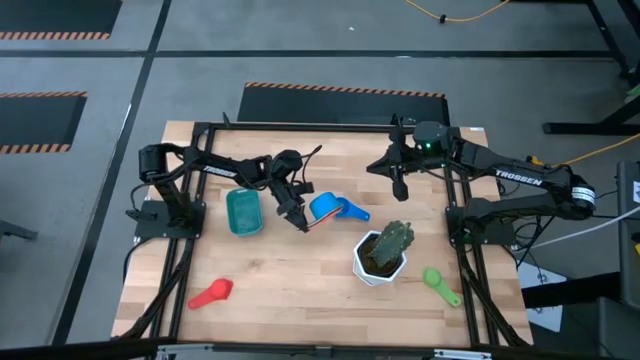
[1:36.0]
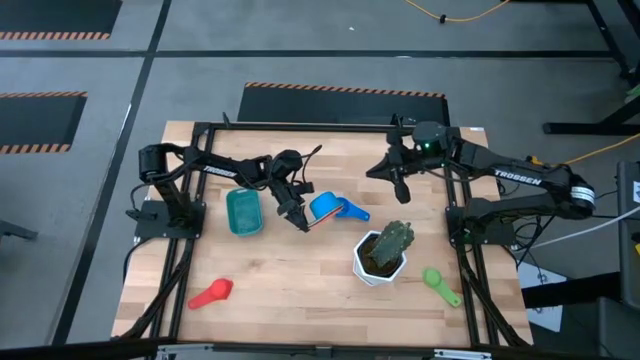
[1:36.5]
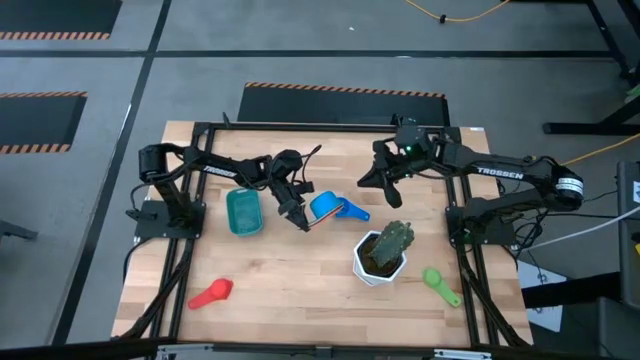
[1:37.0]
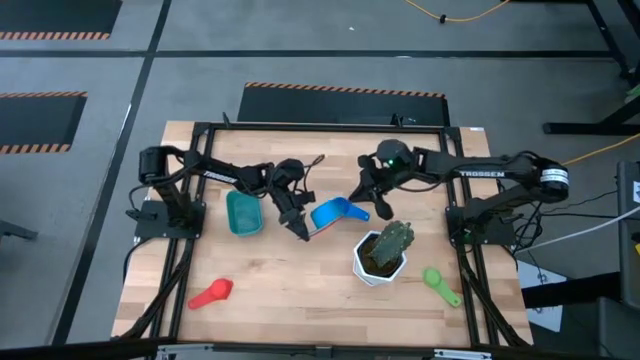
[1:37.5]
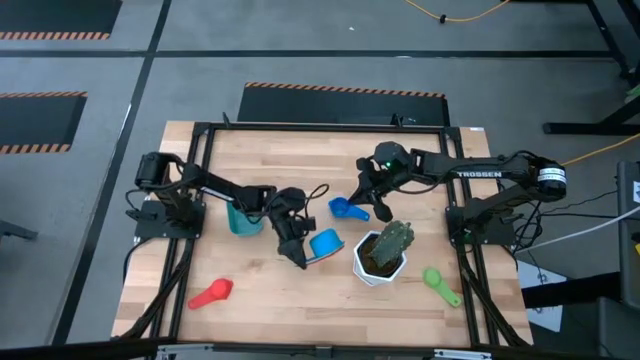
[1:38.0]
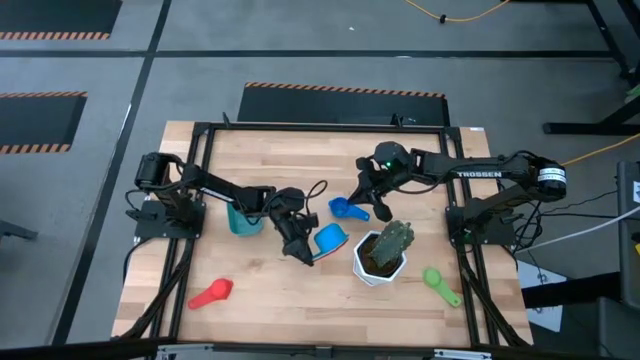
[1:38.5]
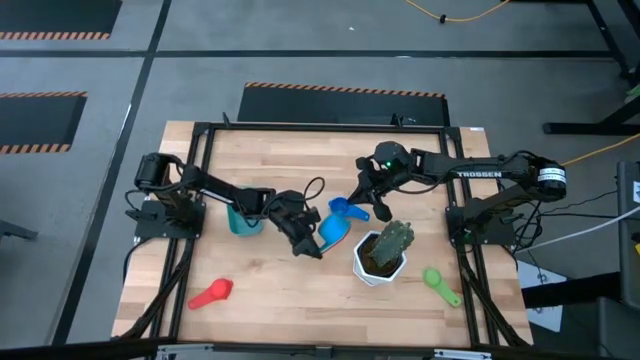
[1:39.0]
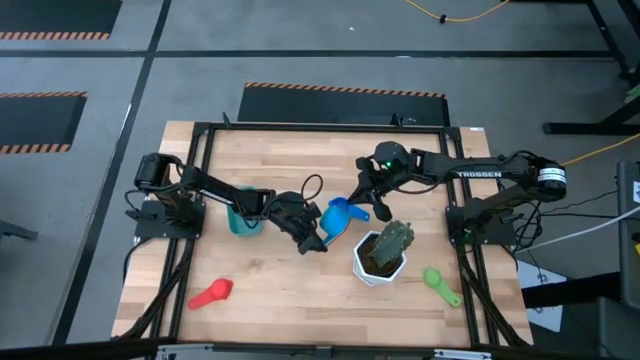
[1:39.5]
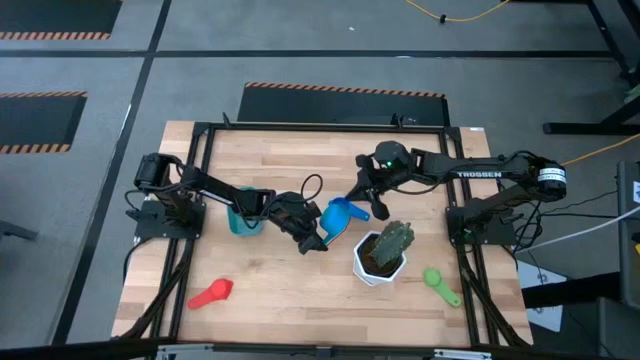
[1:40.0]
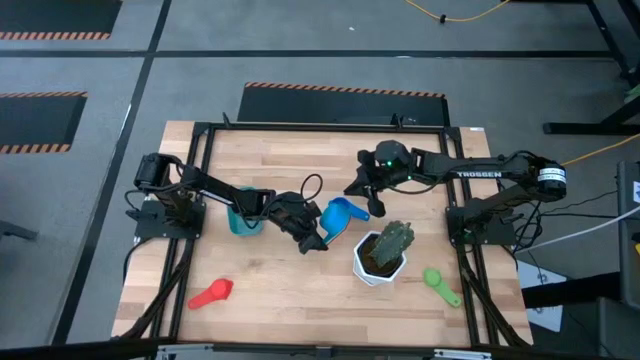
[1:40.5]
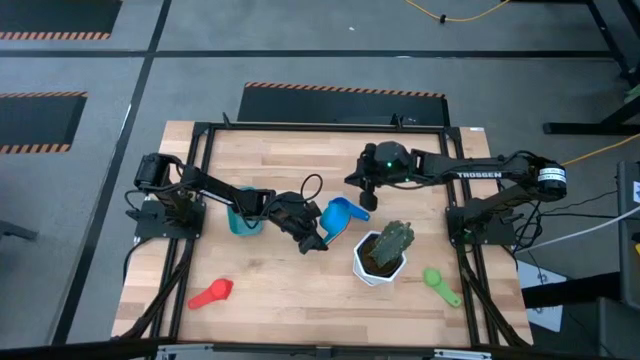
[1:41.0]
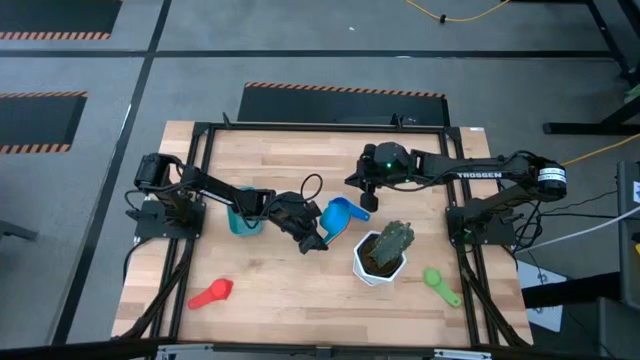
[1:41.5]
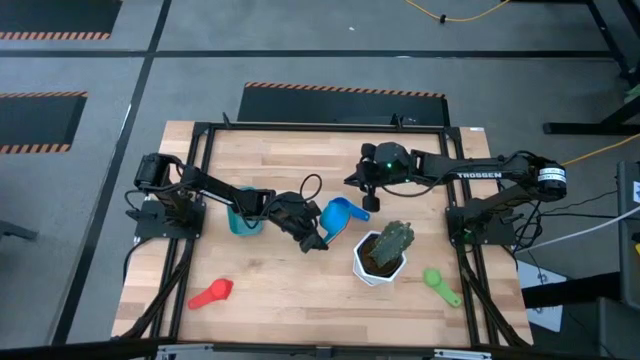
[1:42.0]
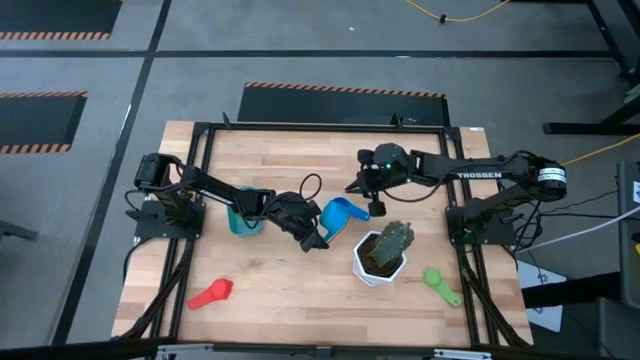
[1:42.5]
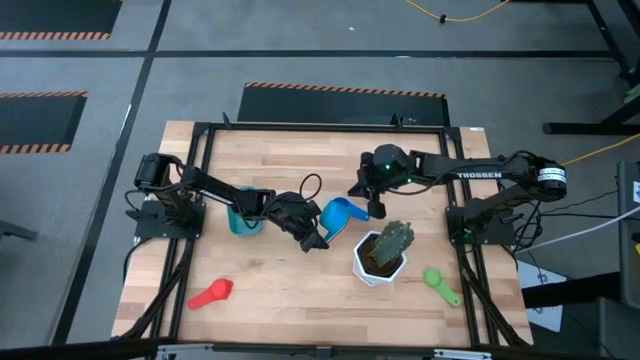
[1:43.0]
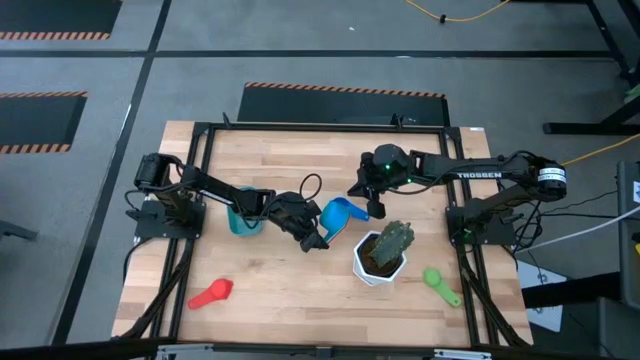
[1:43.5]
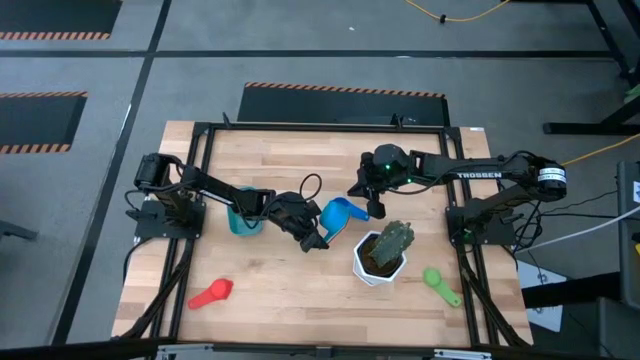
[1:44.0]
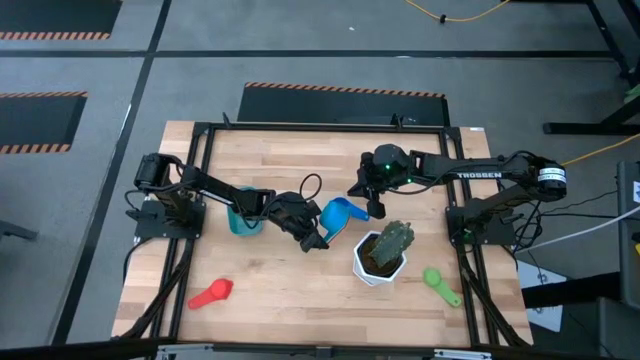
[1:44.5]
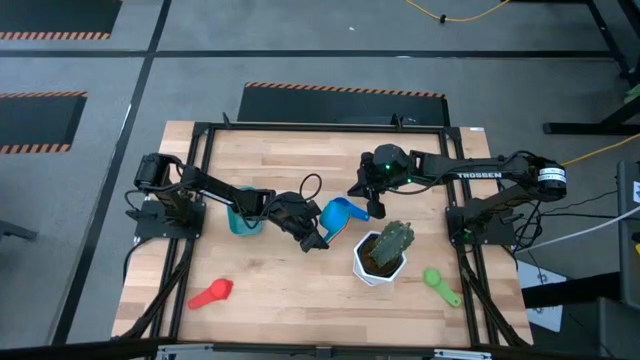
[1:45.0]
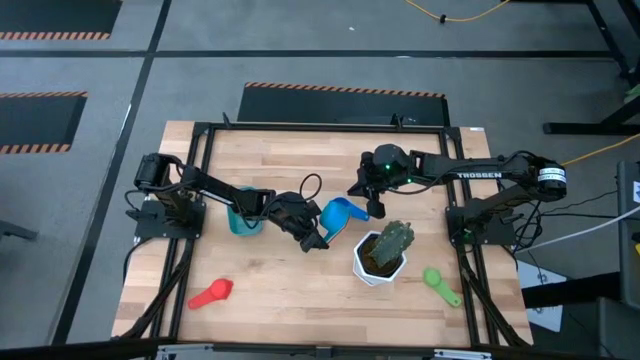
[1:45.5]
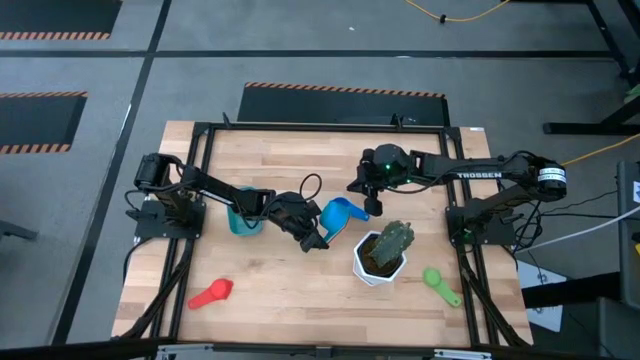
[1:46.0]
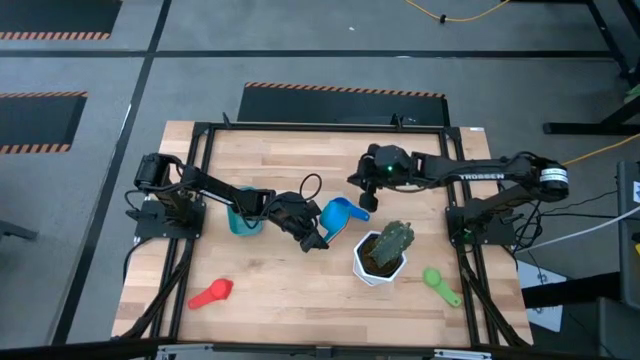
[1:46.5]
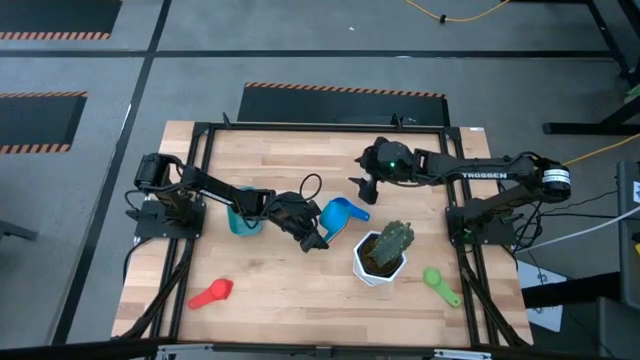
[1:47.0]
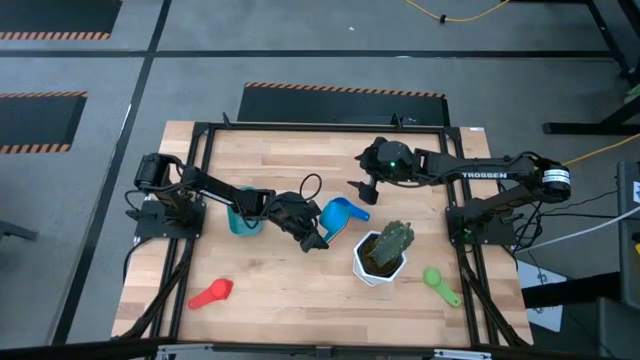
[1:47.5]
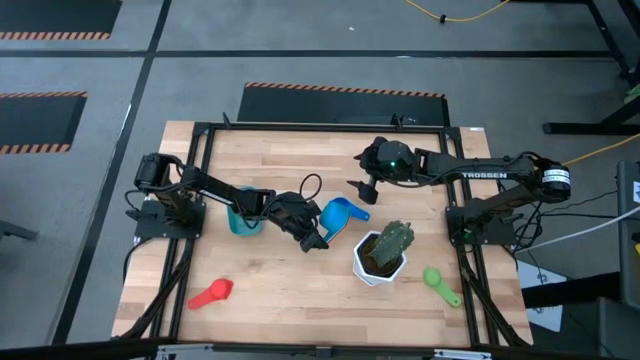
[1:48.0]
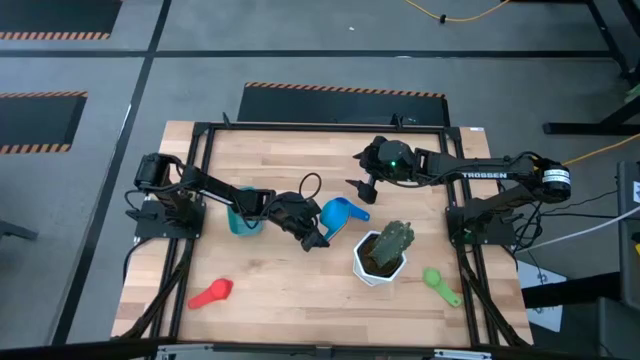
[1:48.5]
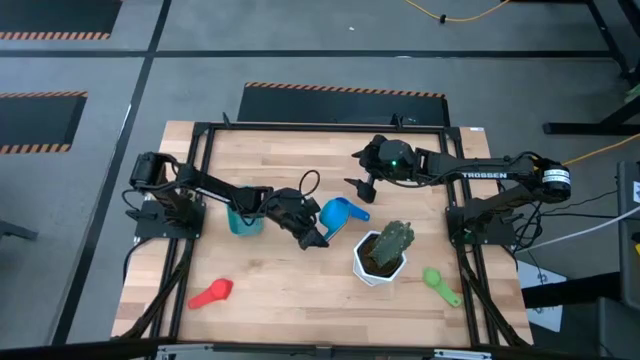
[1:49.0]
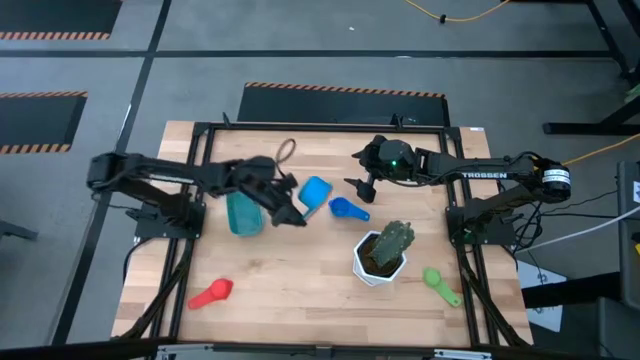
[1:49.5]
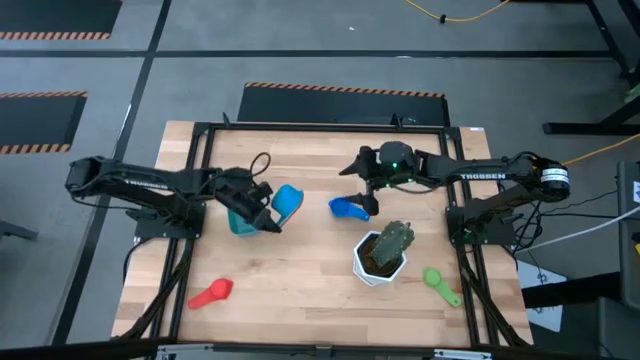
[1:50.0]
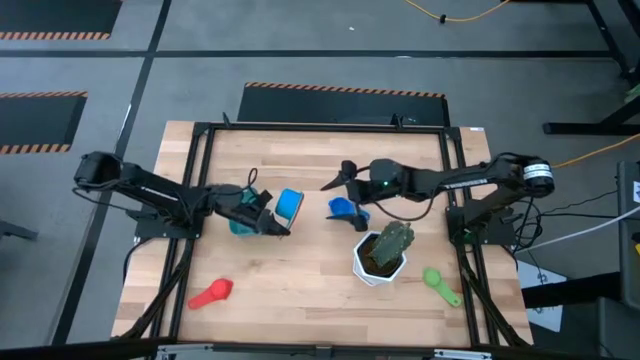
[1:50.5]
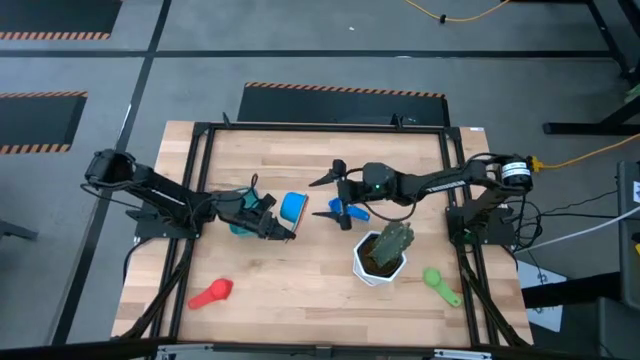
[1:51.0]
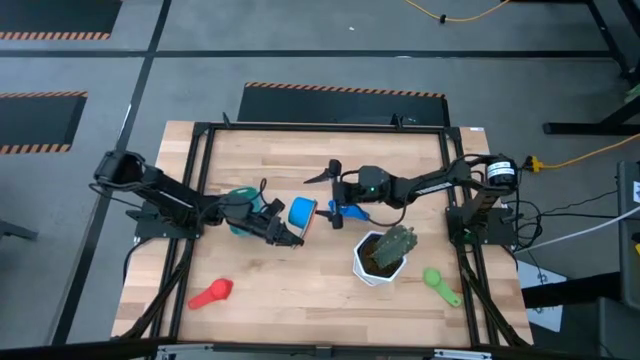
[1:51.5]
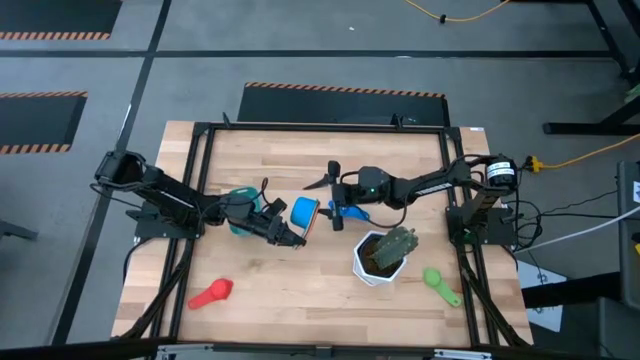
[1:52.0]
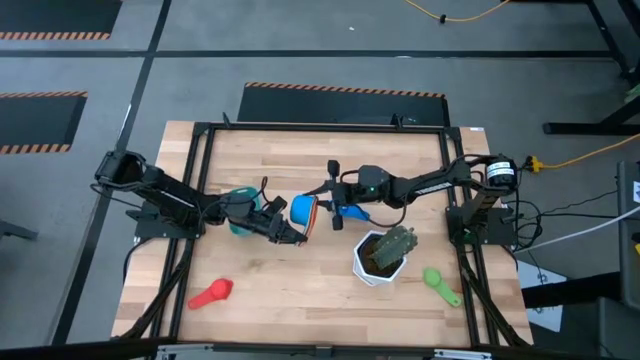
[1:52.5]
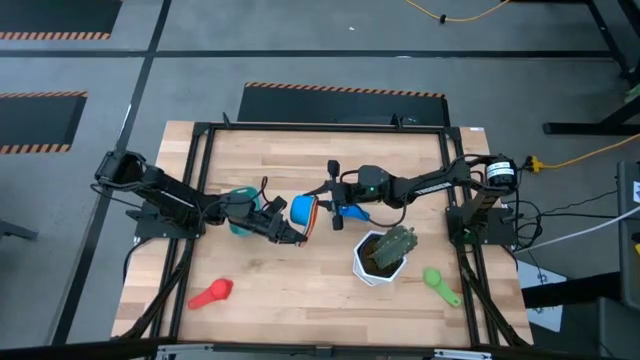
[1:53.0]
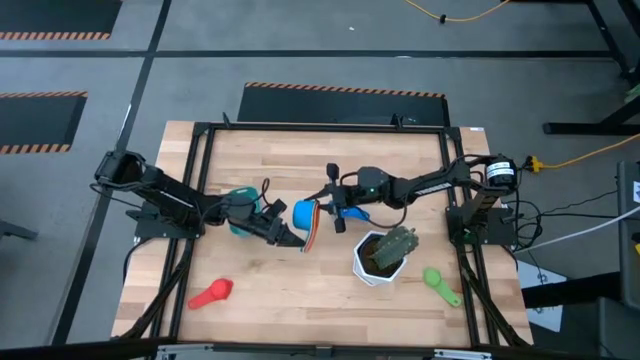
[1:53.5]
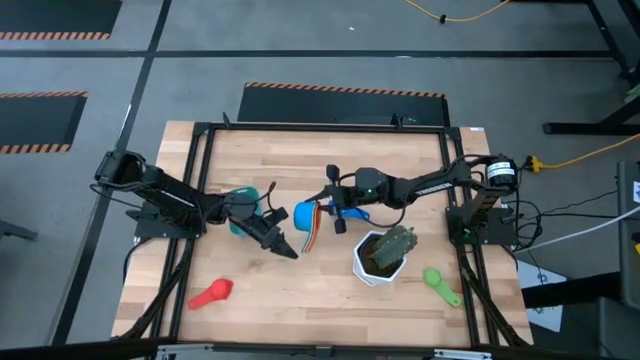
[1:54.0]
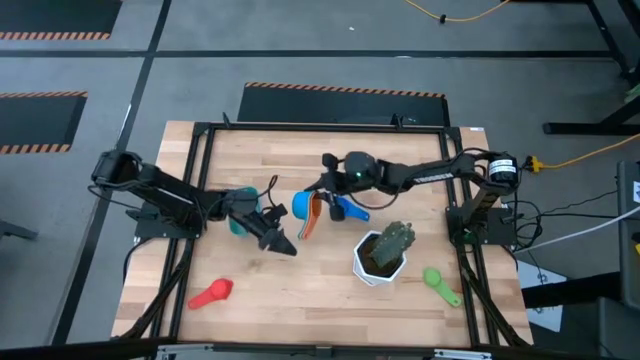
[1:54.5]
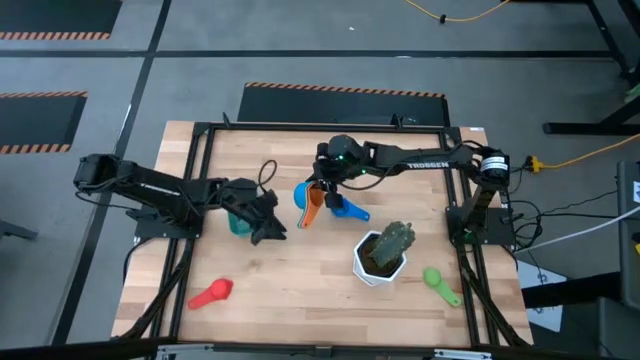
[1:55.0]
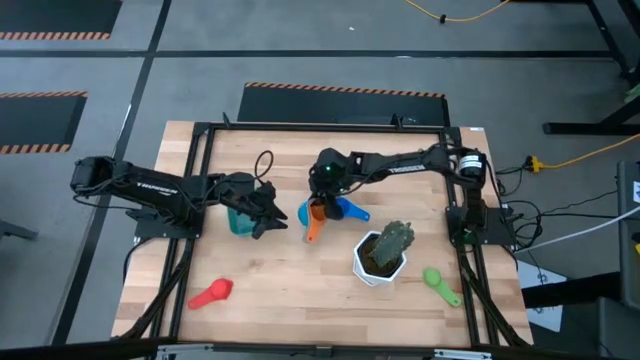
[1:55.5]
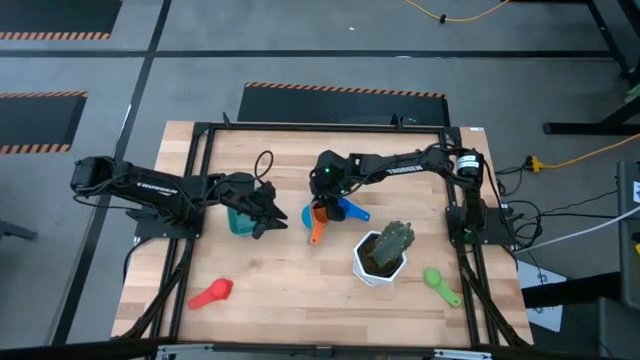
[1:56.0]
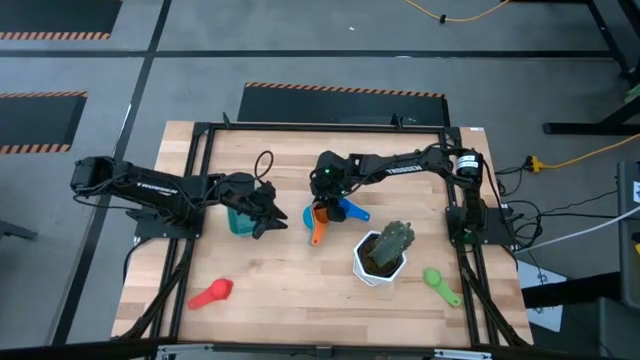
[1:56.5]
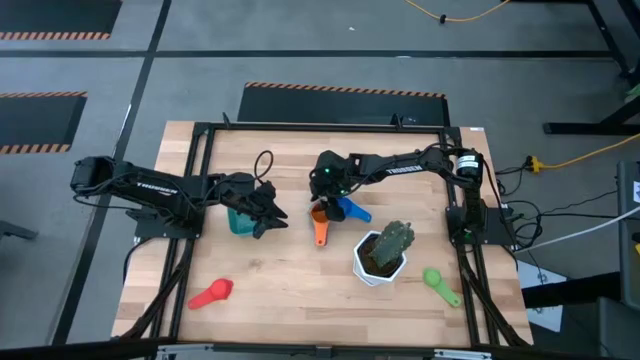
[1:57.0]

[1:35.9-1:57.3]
Task: Nest measuring cups in basket
Stack the blue measuring cup on top of the orange measuring cup
